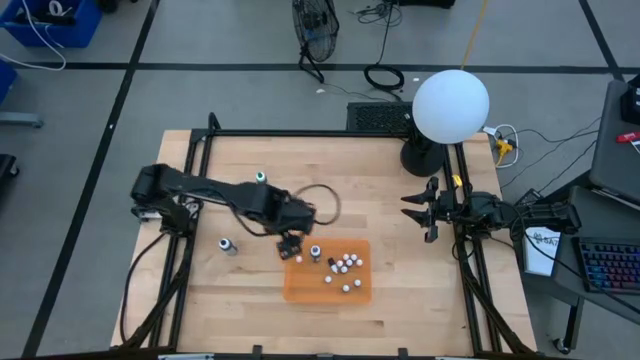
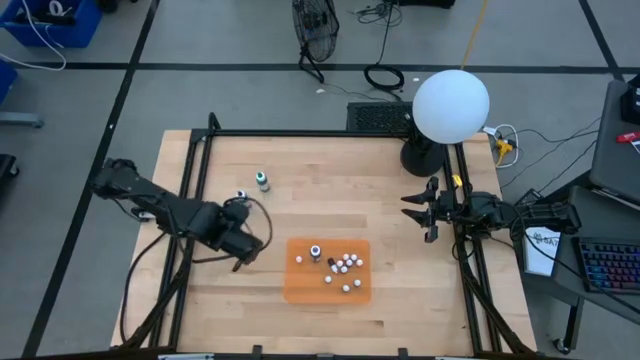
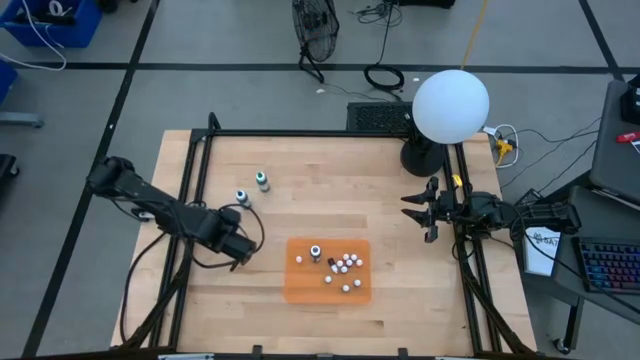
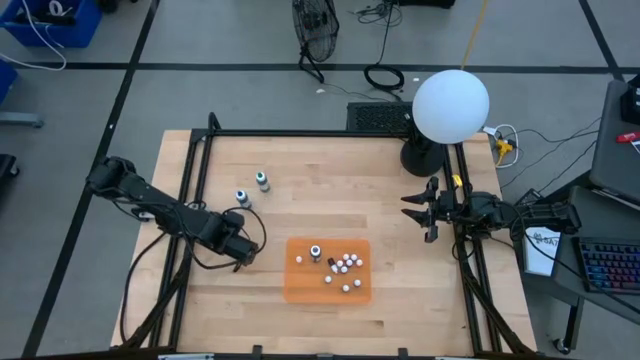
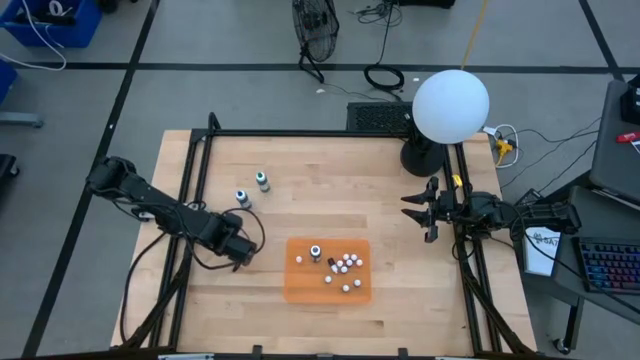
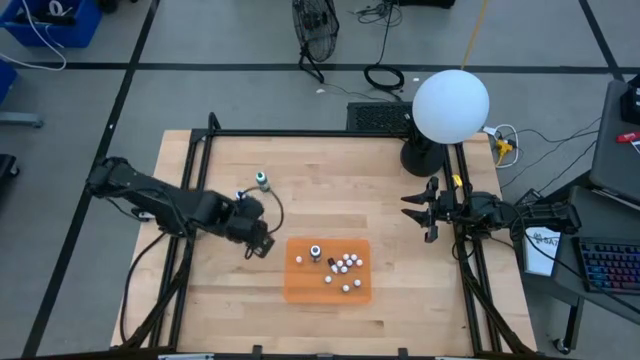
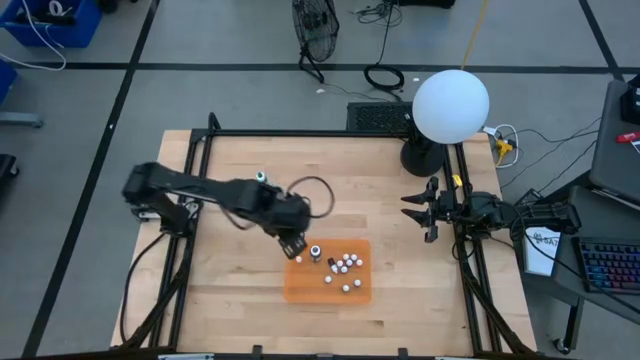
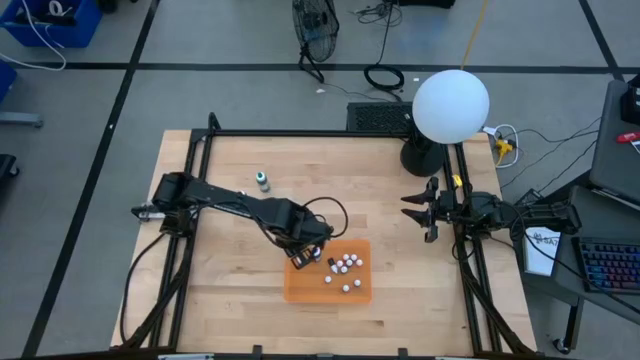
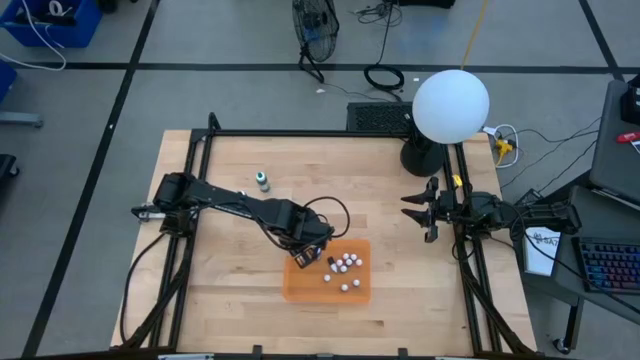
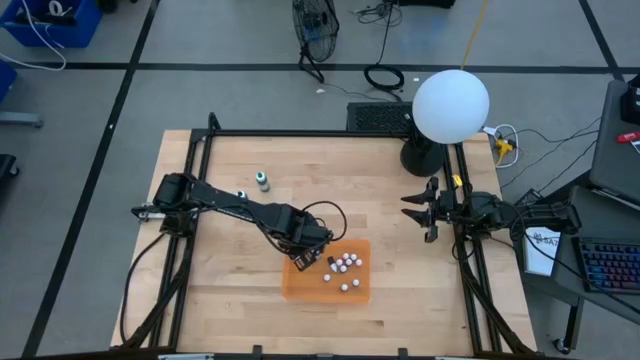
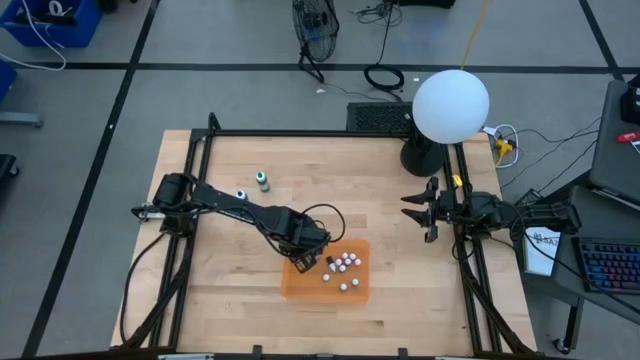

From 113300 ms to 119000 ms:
Task: Pick & Place food coloring
Put the large black food coloring bottle into the orange bin

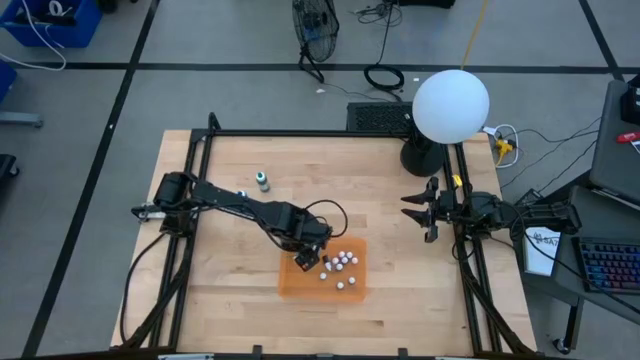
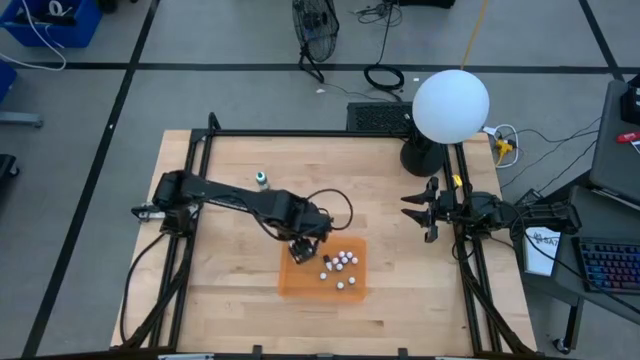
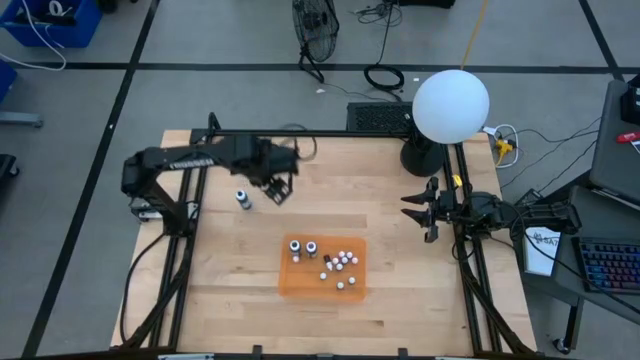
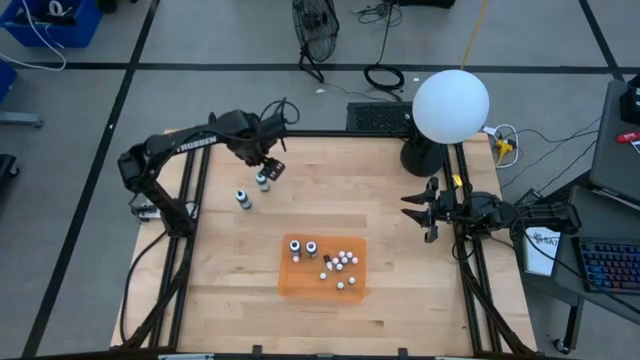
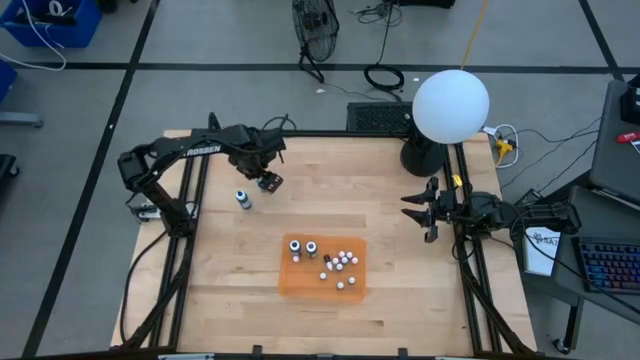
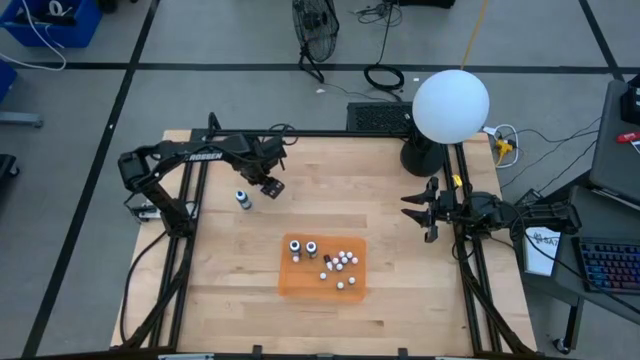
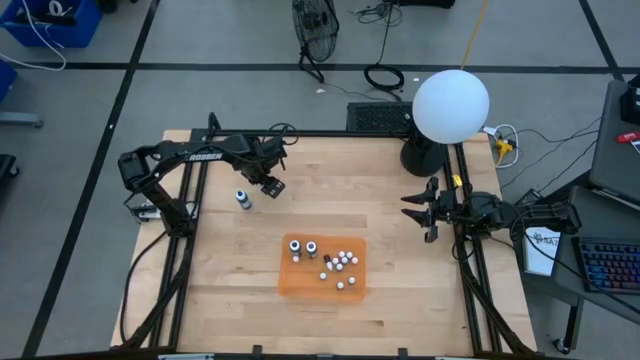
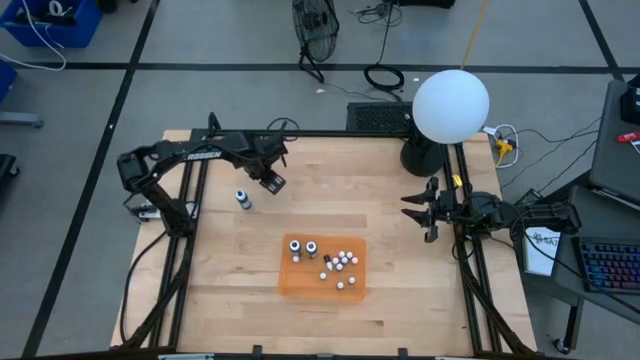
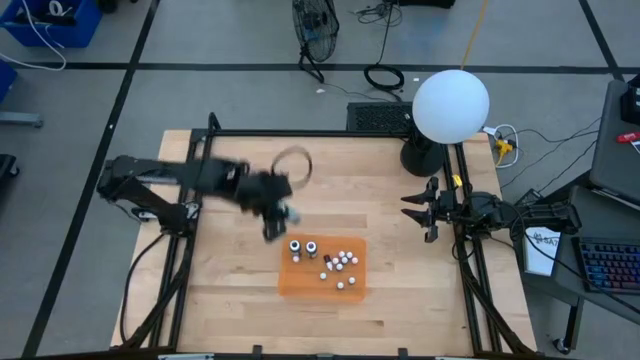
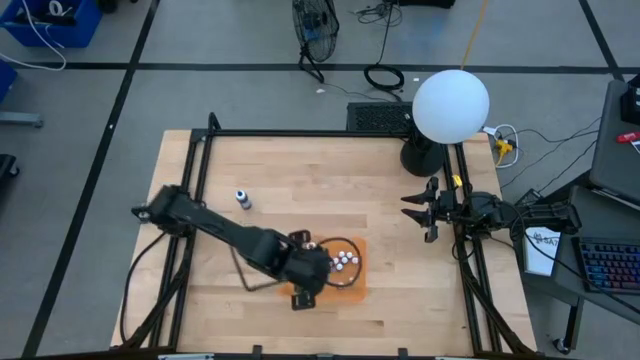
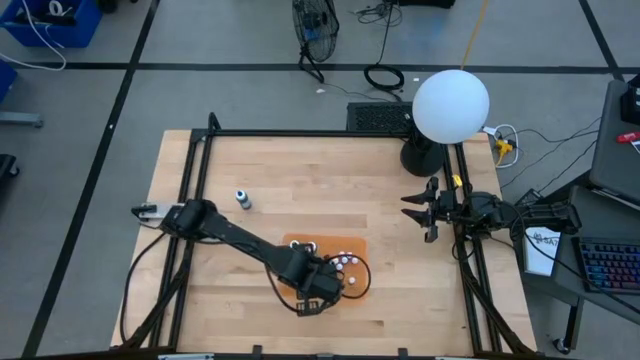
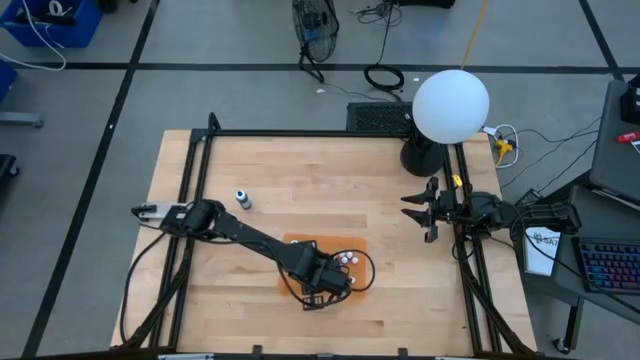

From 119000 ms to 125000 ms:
Put the large green food coloring bottle into the orange bin

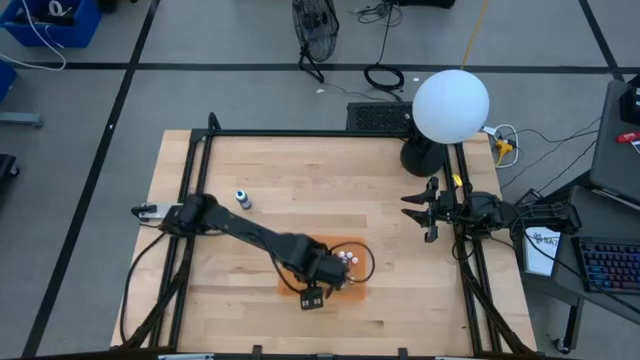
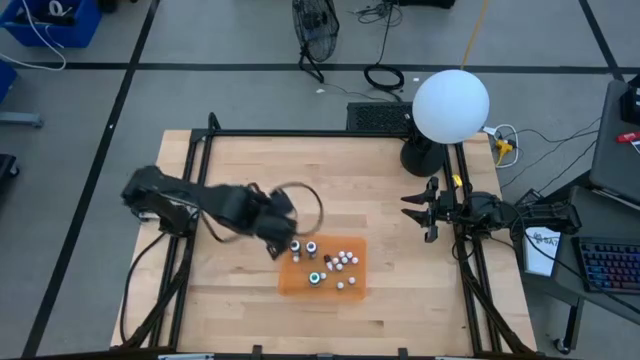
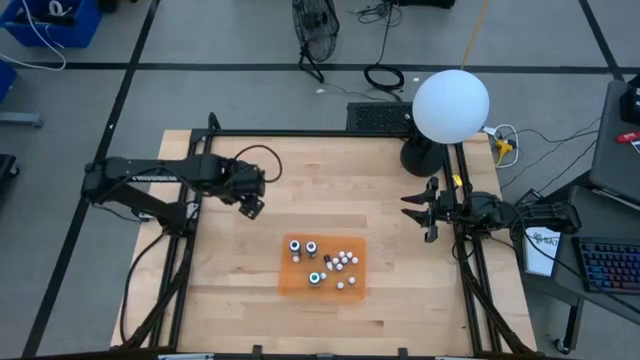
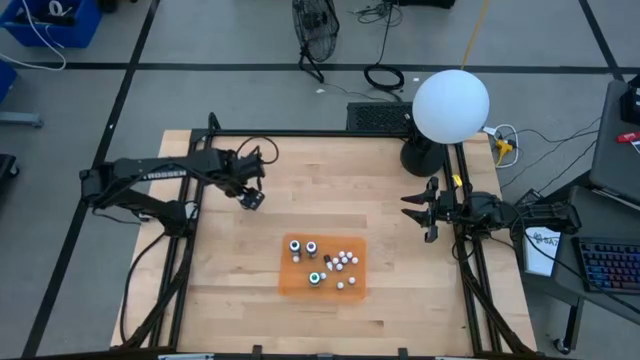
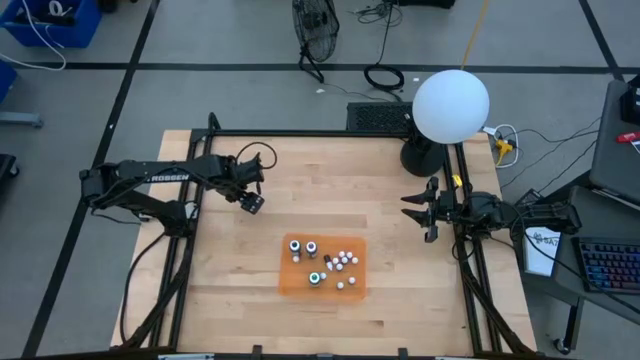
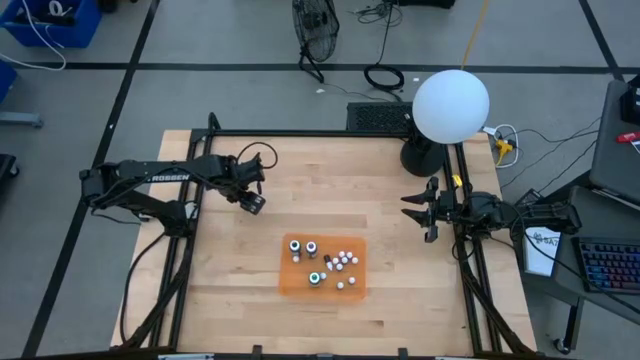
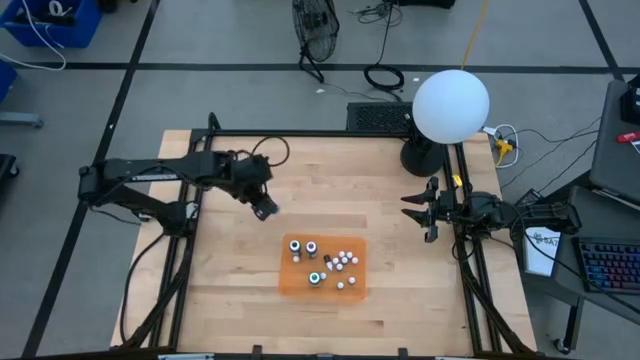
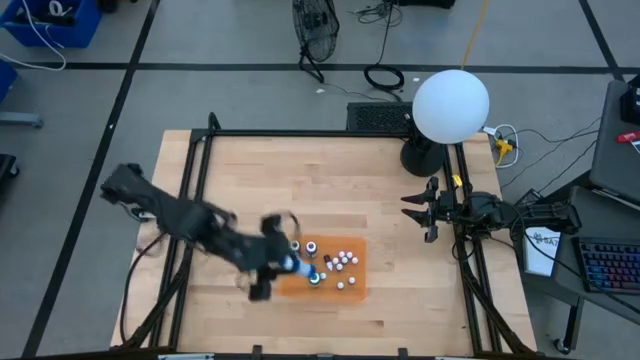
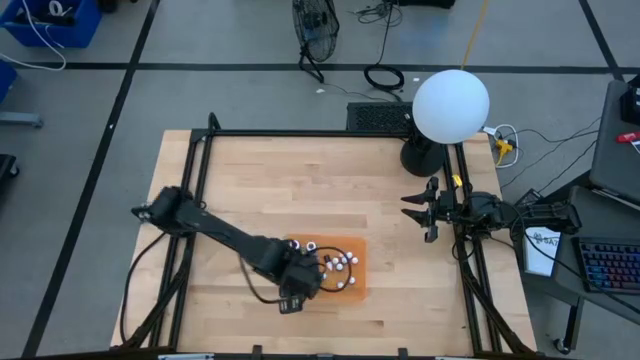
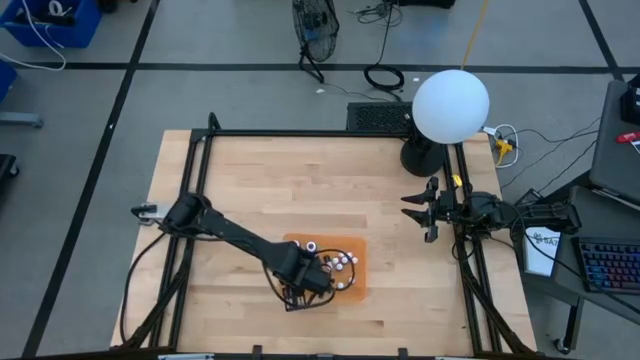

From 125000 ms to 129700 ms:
Put the large blue food coloring bottle into the orange bin

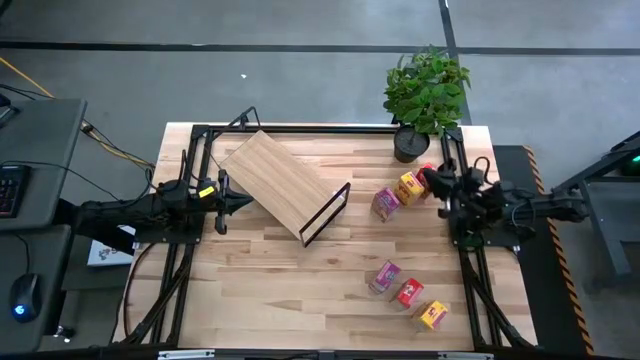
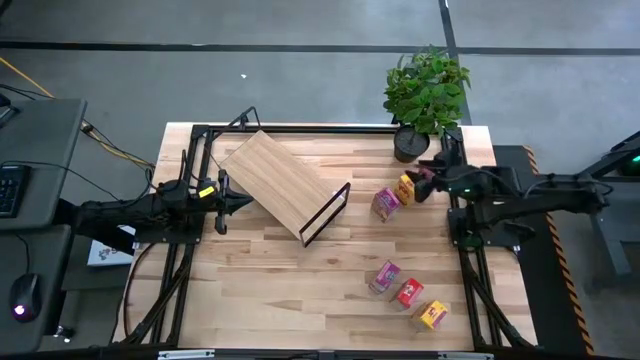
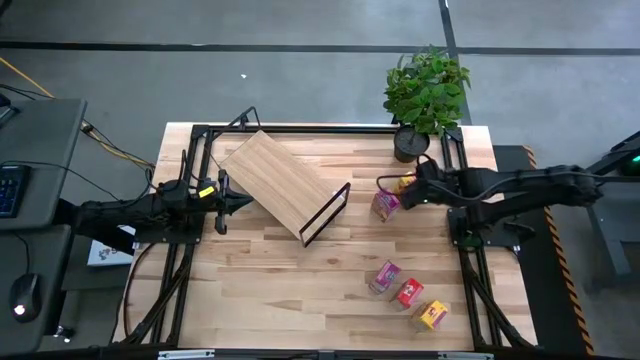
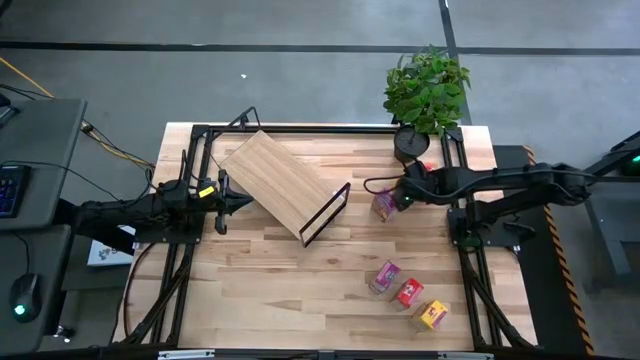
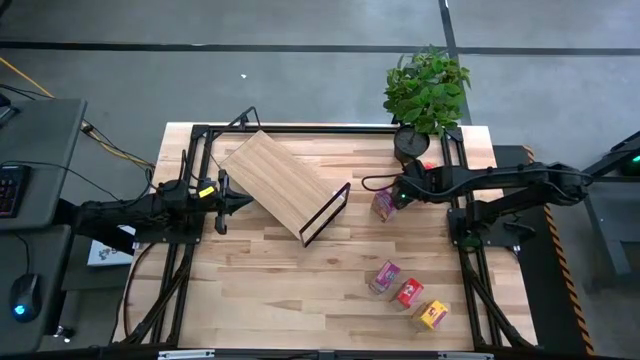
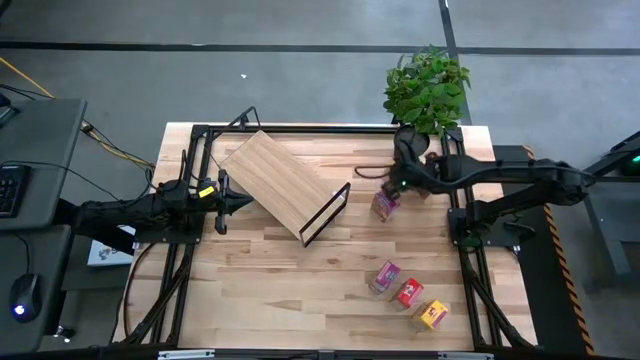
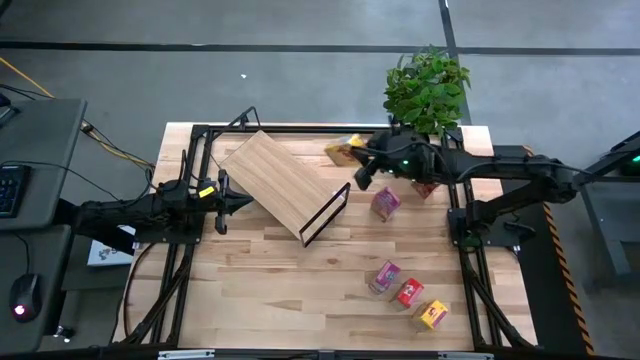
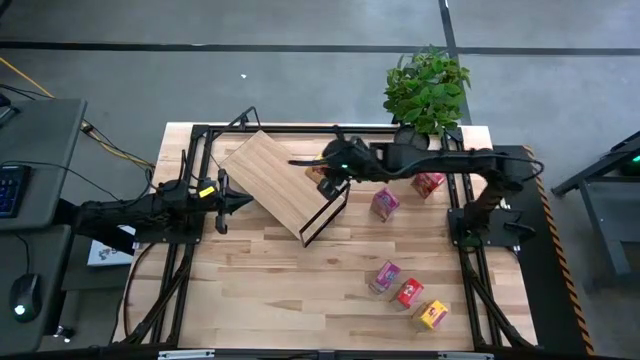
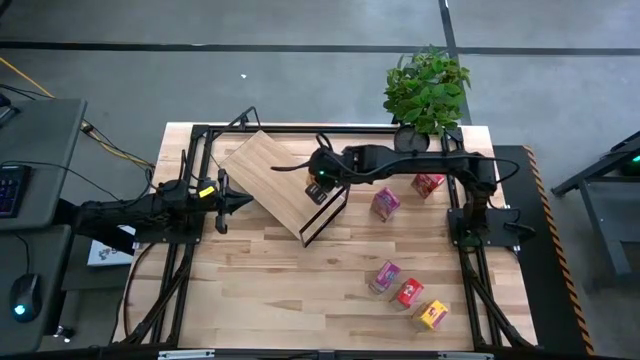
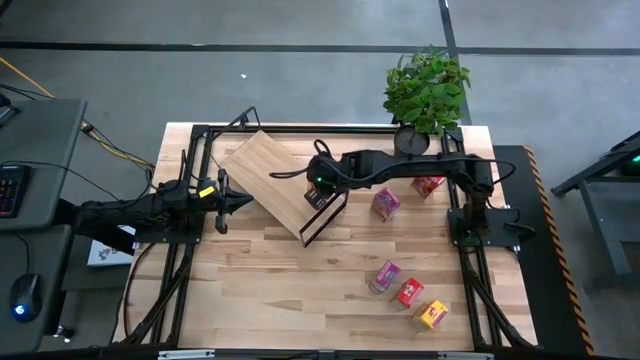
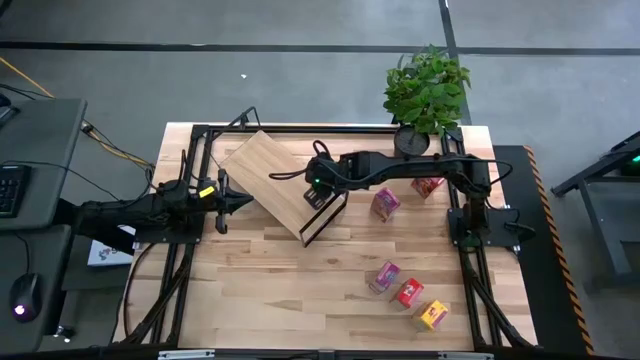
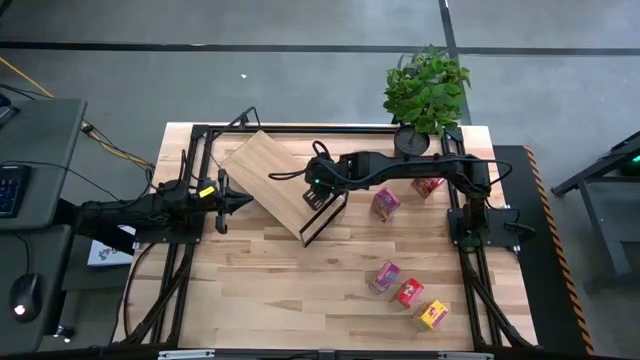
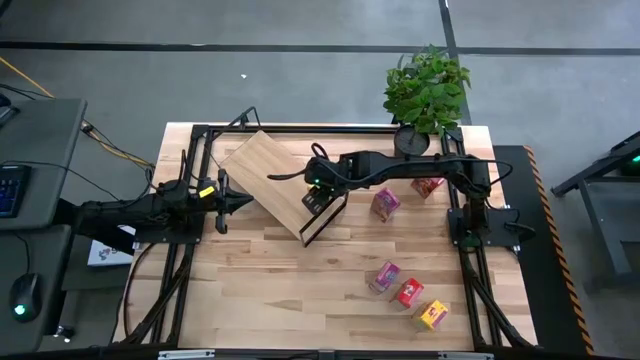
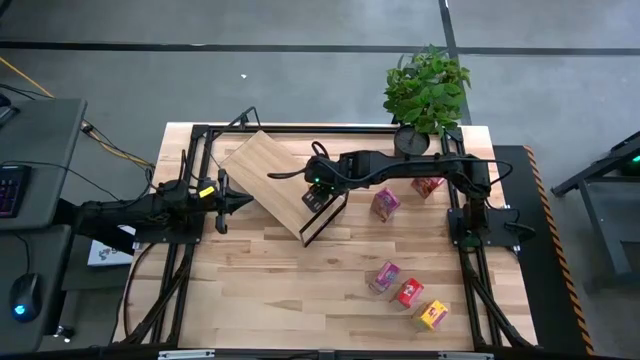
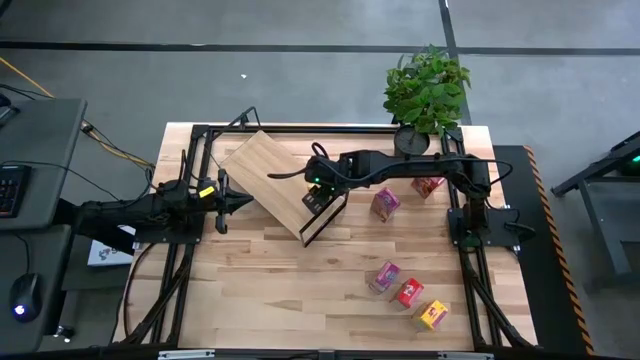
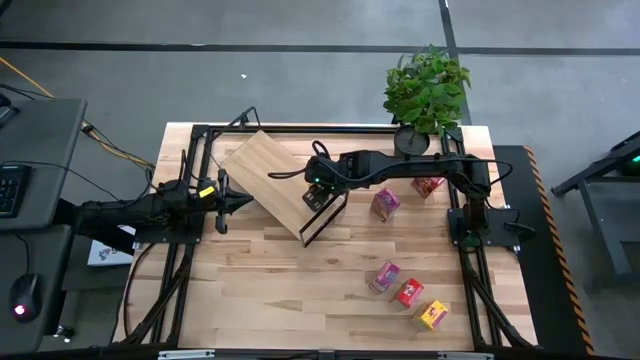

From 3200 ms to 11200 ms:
Task: Stack cereal on shelf
Put the top yellow cereal box on the shelf
